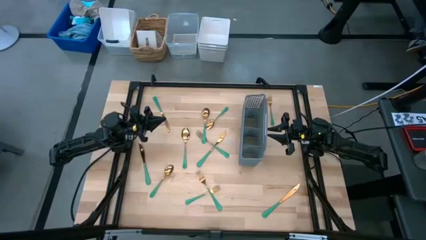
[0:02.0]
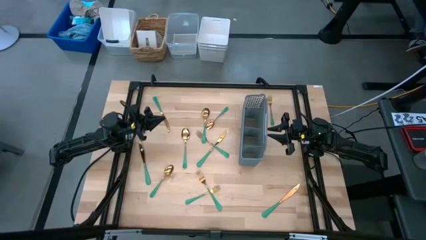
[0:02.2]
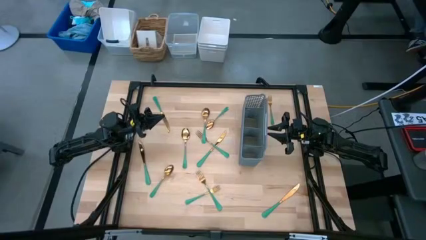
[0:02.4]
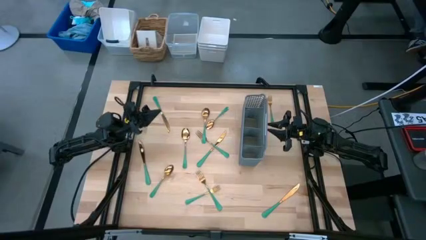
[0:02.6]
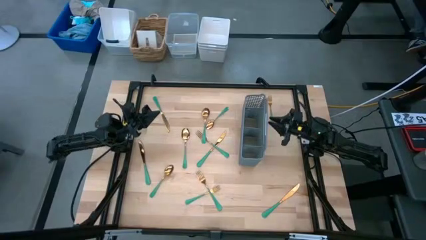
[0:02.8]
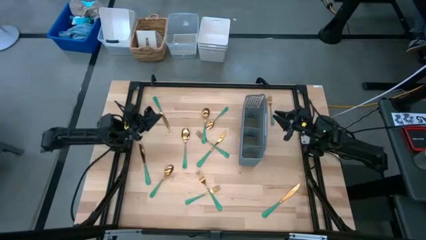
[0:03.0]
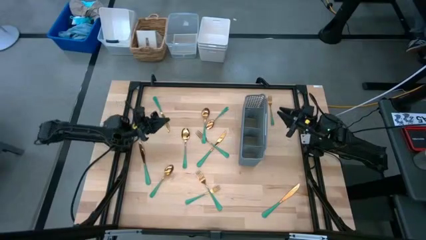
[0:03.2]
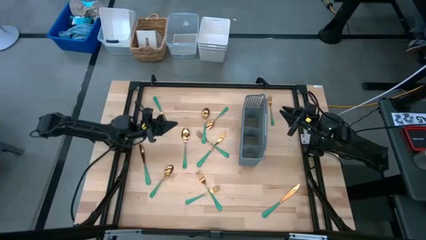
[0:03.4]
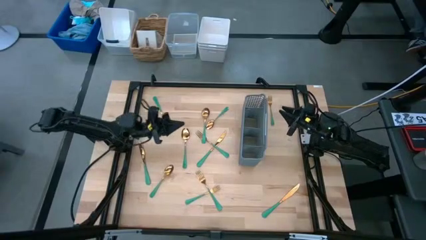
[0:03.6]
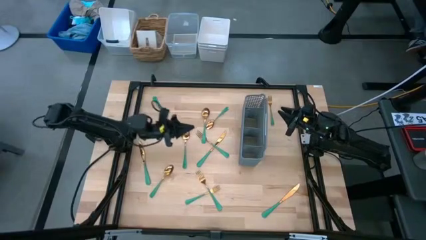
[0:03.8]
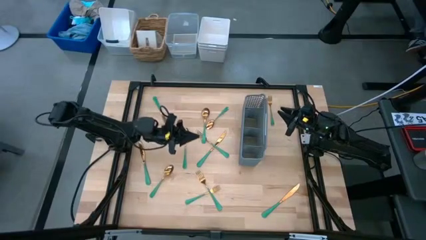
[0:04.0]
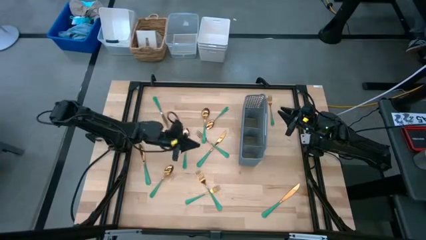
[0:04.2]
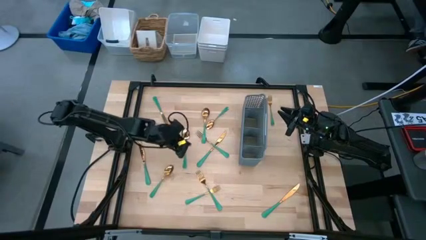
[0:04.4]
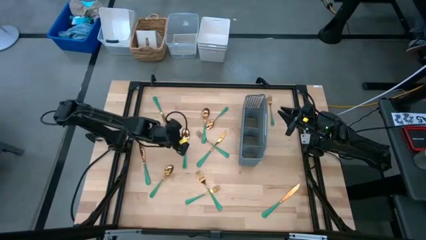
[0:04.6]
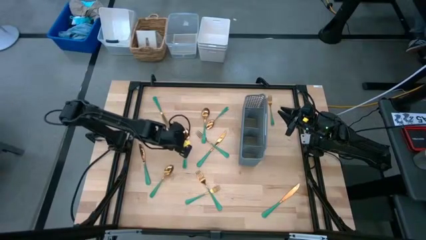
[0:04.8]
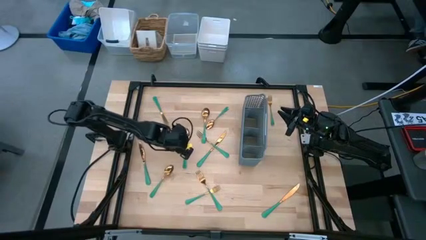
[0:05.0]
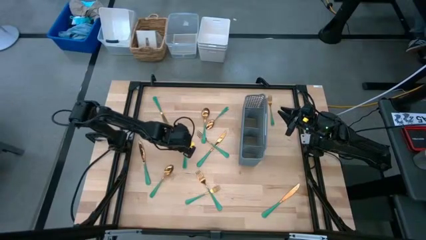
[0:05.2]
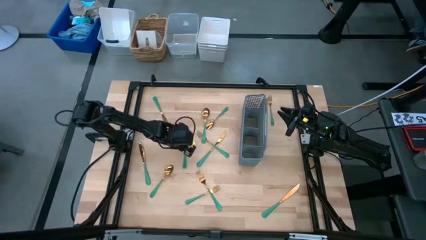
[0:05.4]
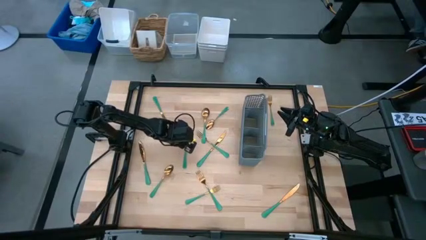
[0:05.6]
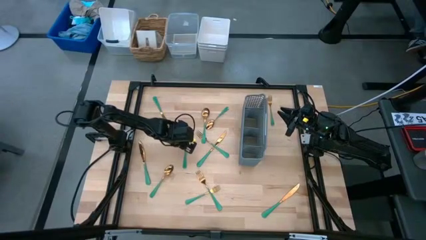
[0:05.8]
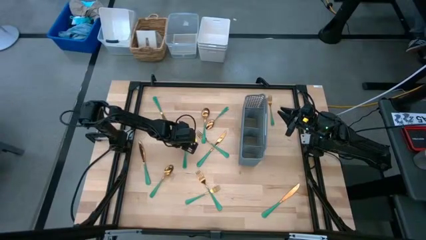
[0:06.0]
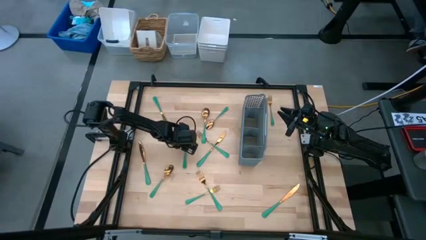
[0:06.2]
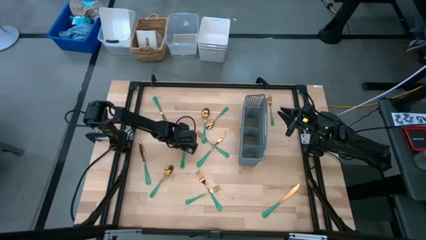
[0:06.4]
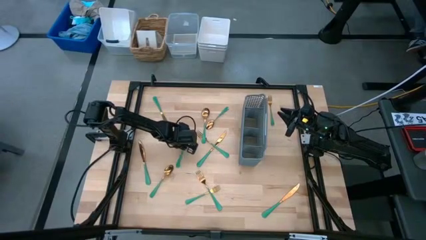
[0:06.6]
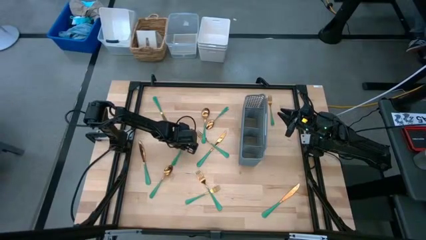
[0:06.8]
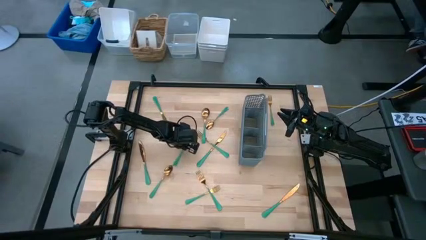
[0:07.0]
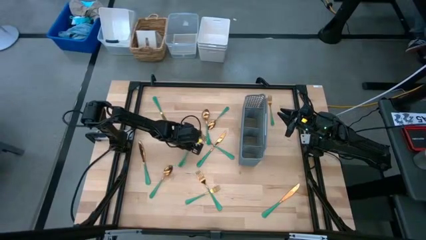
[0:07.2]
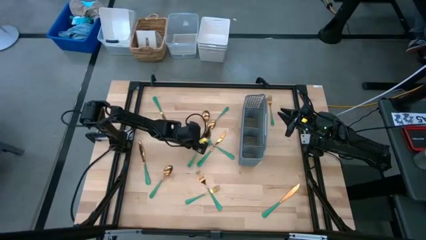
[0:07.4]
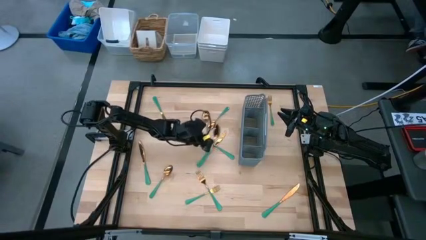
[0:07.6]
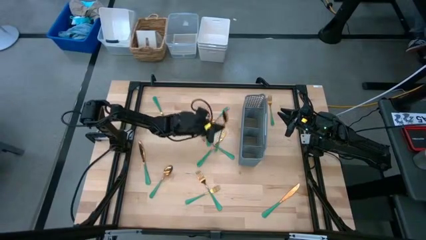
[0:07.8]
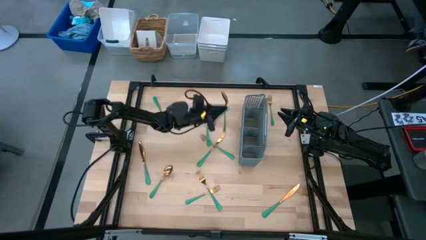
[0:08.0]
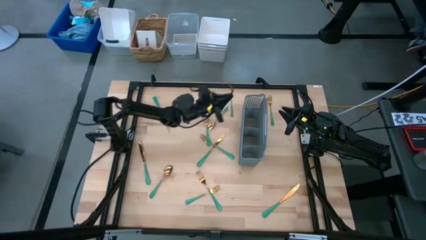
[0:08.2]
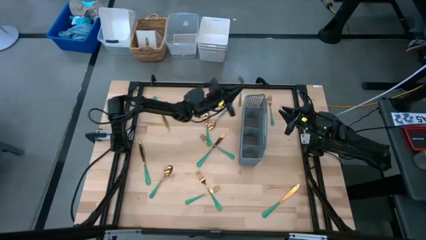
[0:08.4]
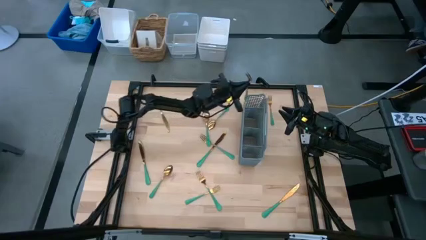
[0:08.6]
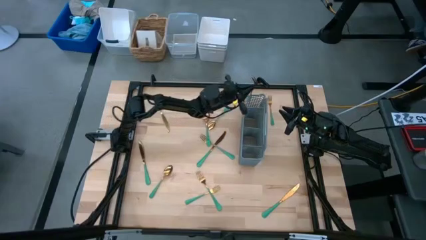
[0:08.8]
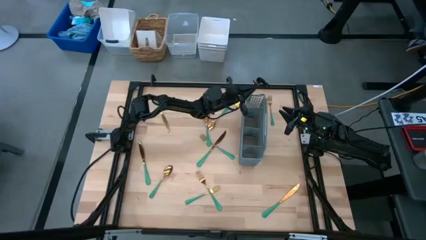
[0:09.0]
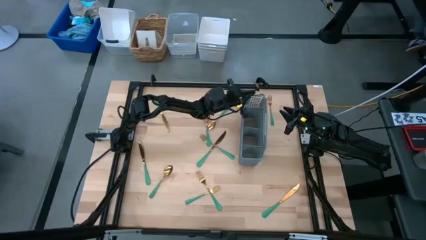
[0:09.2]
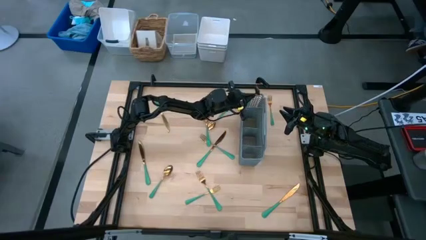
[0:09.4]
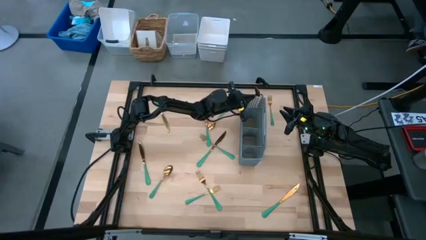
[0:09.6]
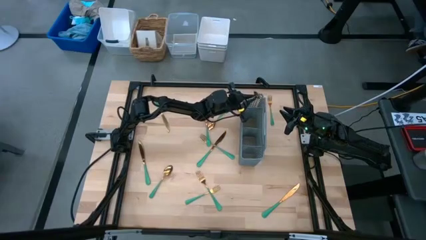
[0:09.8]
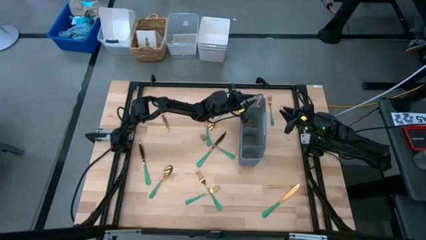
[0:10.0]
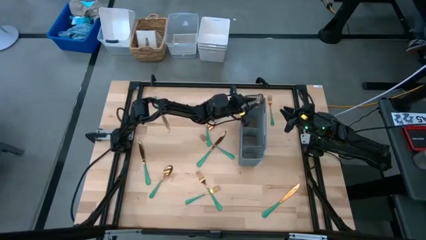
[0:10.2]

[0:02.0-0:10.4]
Task: Sort silverware
Put the middle spoon into the top section of the basket

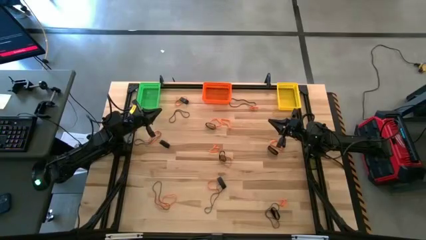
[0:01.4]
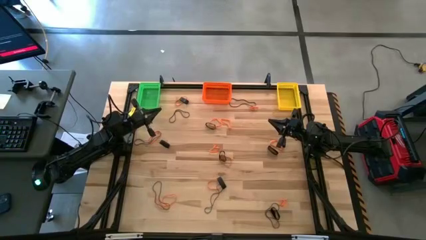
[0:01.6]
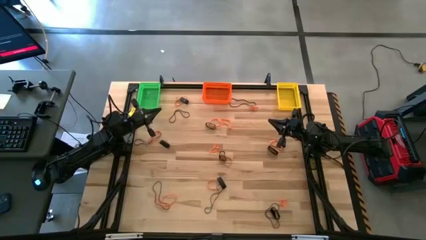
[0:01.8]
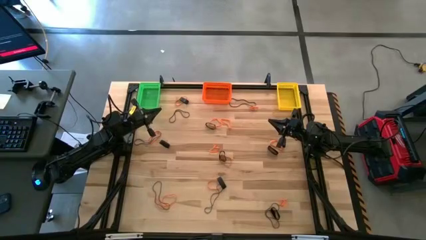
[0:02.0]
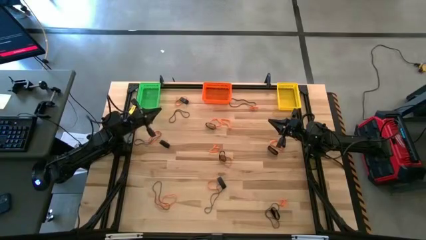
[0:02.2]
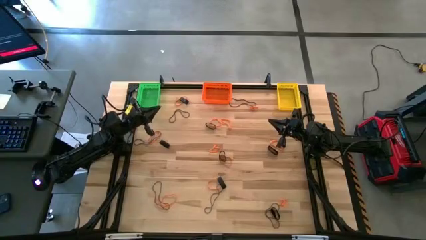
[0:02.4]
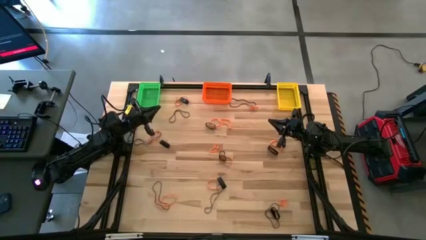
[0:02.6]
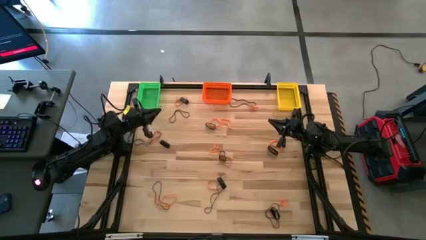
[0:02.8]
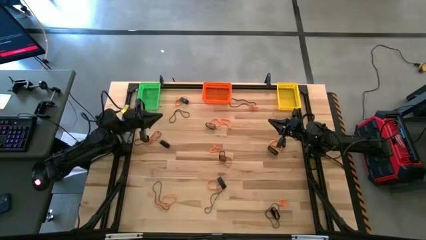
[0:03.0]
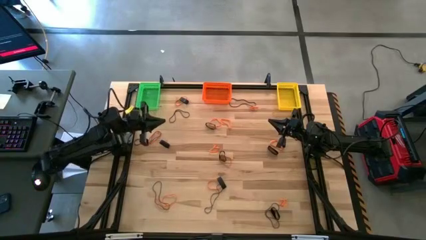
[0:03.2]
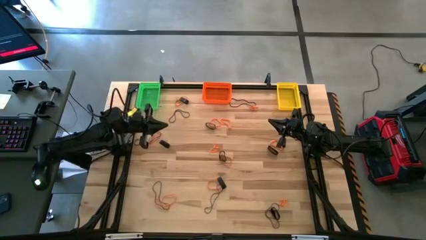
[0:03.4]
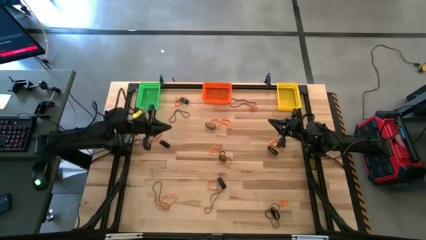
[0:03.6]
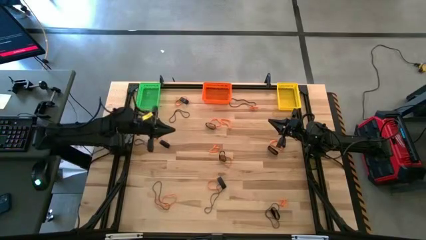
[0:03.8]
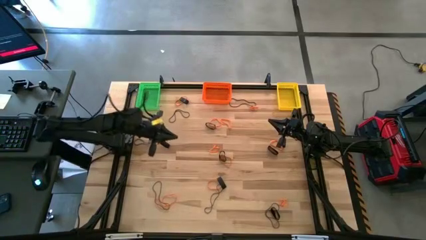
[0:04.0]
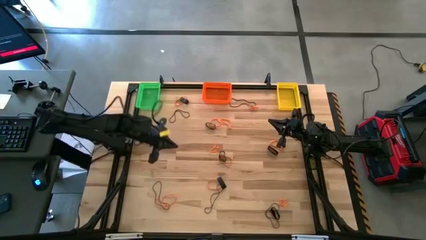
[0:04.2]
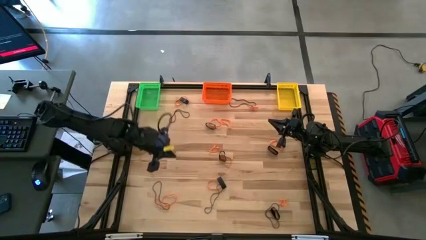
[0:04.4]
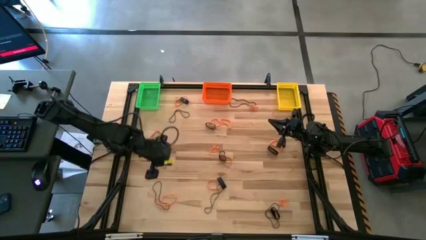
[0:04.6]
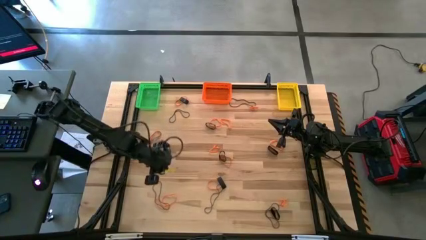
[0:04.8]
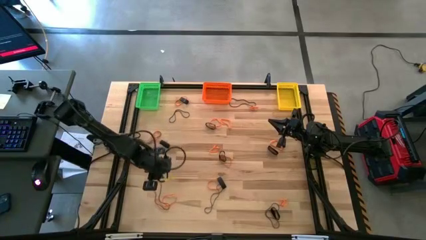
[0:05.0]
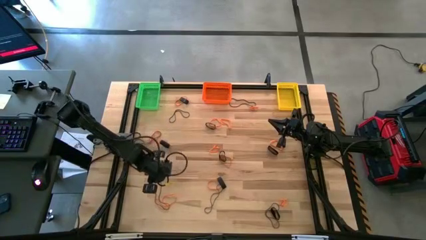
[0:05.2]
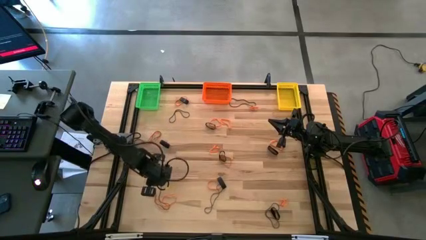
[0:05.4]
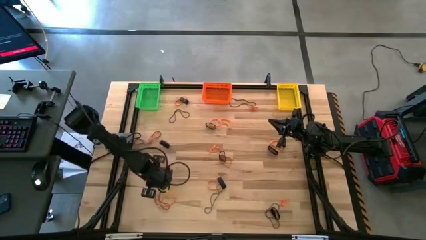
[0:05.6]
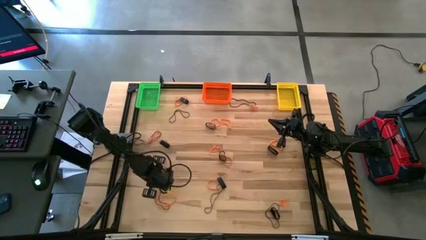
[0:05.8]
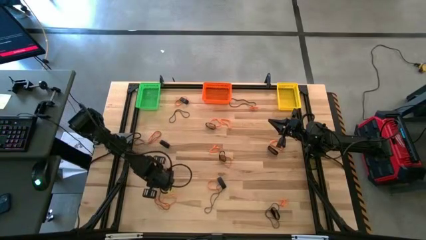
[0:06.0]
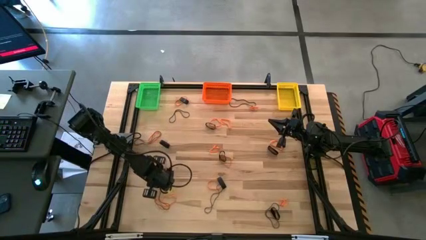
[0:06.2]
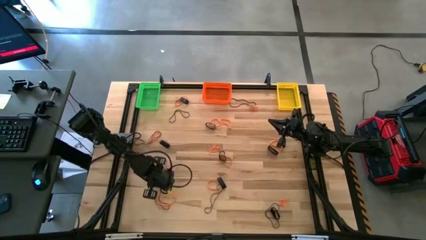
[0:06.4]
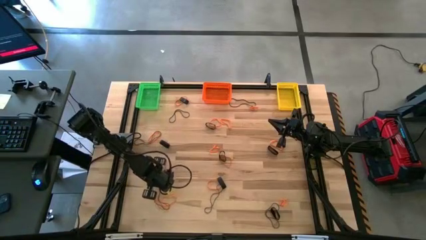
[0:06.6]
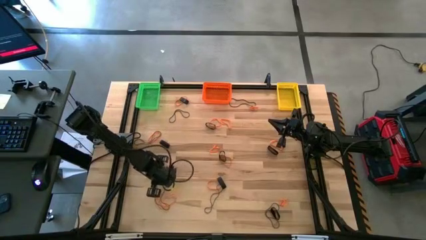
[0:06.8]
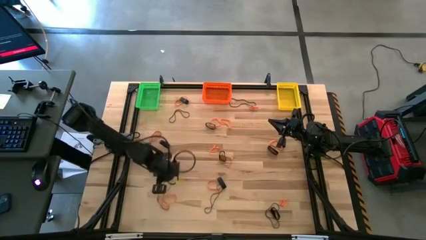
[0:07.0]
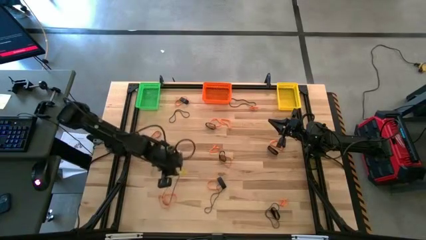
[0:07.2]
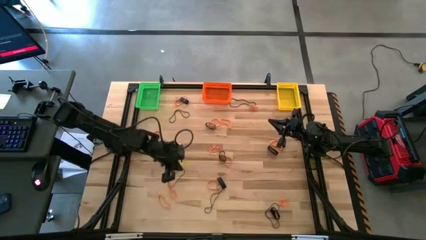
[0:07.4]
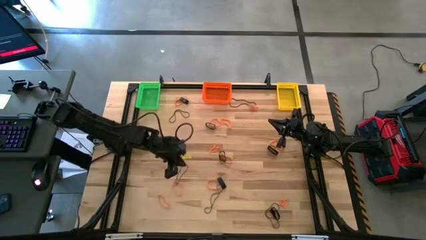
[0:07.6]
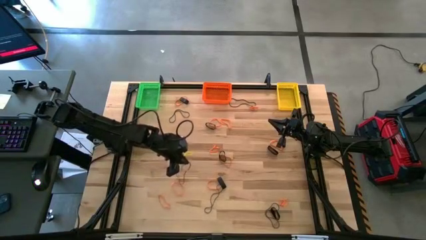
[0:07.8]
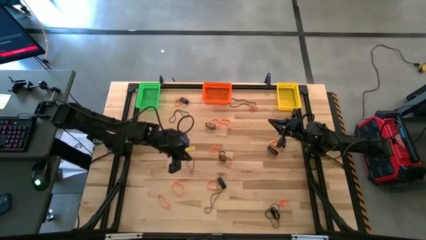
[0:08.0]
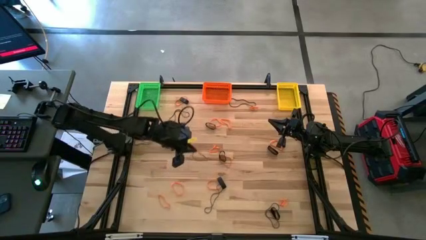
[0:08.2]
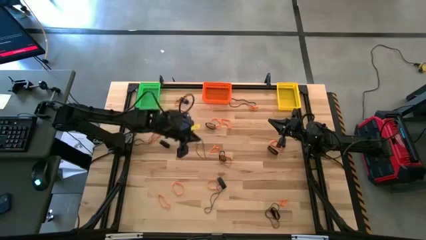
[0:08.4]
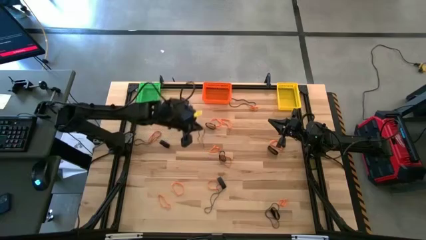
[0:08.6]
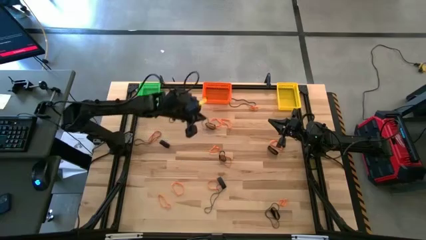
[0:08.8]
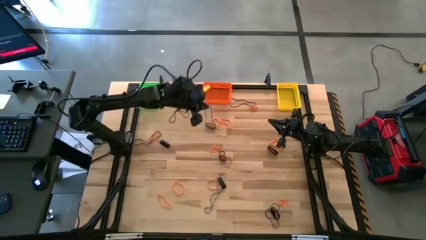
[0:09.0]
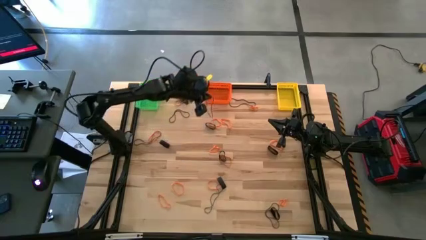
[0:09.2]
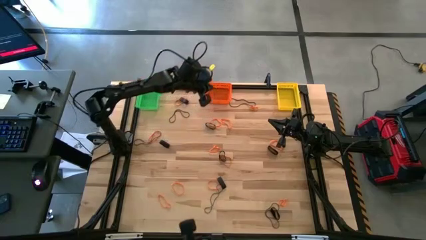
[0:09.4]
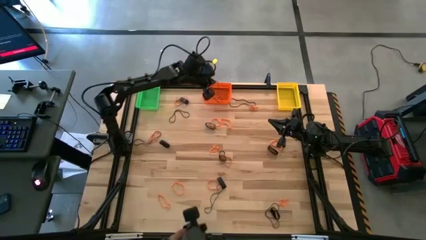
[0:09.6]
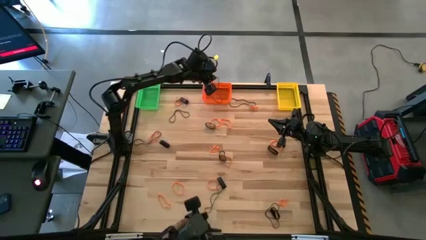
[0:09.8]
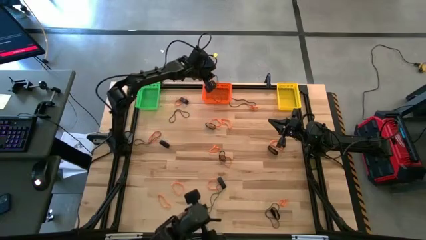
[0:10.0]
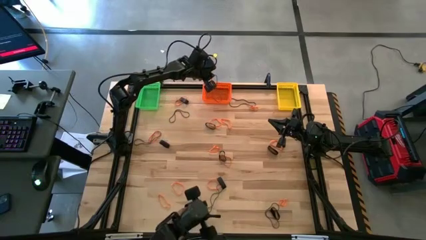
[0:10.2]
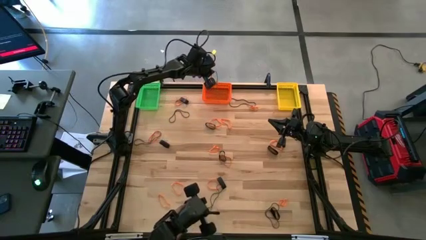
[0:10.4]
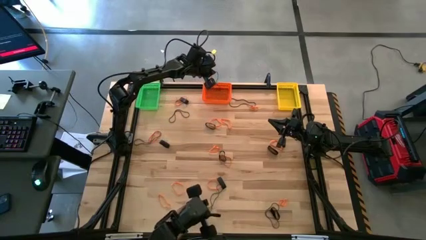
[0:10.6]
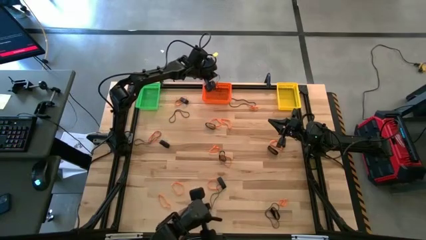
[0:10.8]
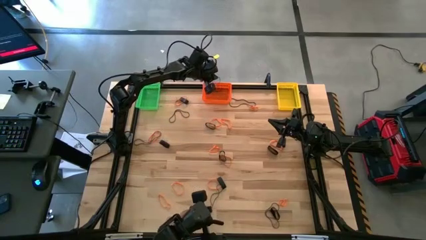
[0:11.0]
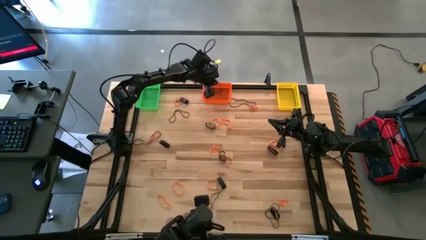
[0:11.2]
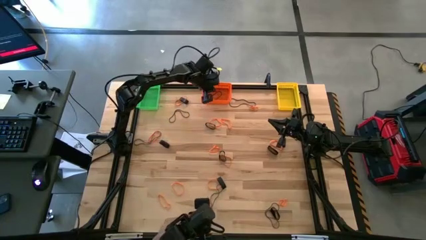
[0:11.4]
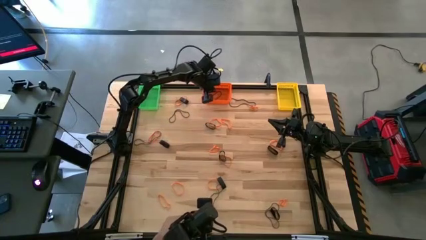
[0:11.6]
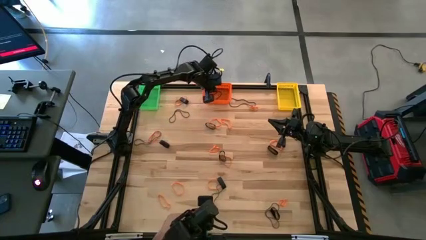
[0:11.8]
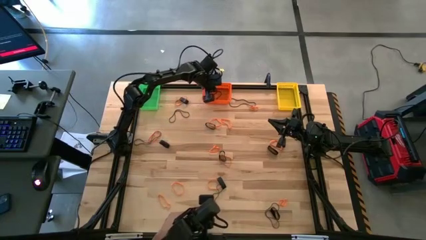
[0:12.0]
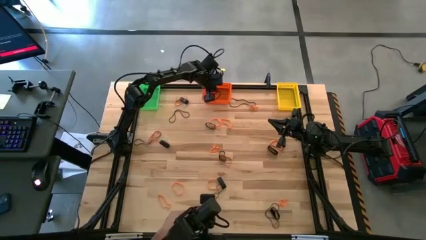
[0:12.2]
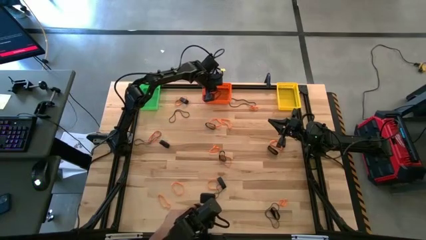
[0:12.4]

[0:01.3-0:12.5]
Task: Sort rubber bands into baskets
Put the bottom left blue rubber band into the orange bin
